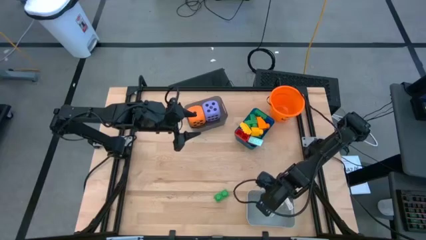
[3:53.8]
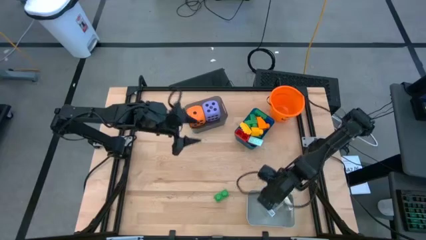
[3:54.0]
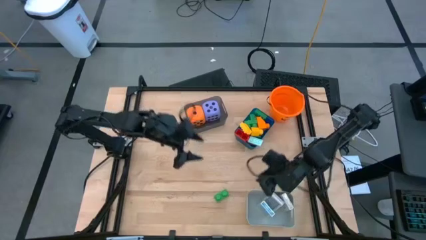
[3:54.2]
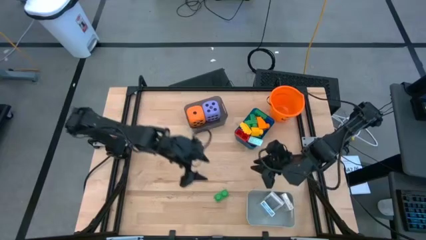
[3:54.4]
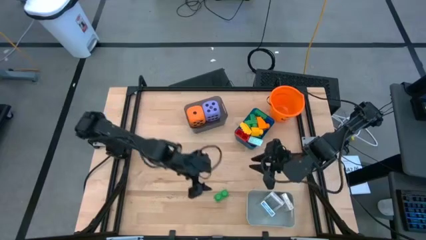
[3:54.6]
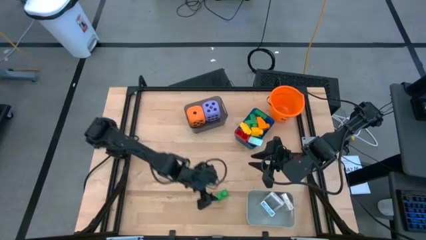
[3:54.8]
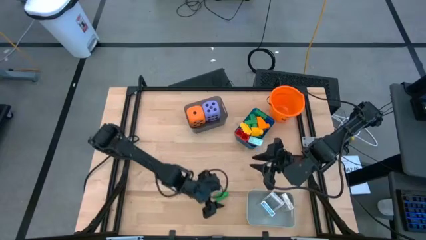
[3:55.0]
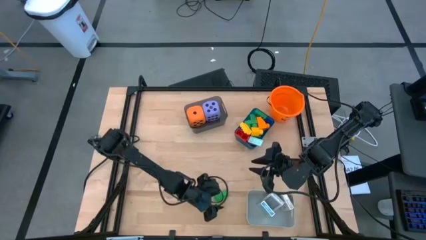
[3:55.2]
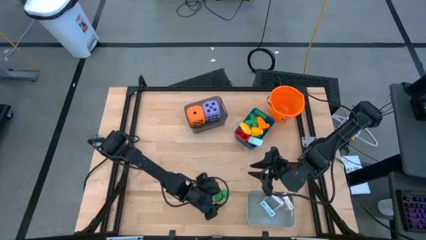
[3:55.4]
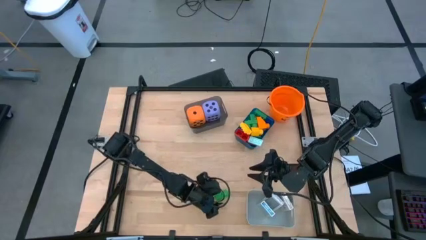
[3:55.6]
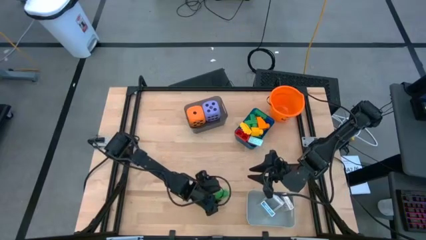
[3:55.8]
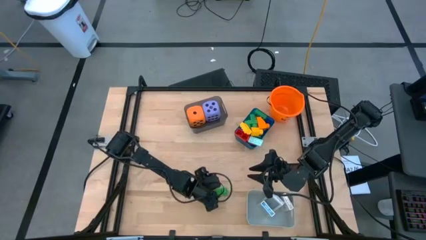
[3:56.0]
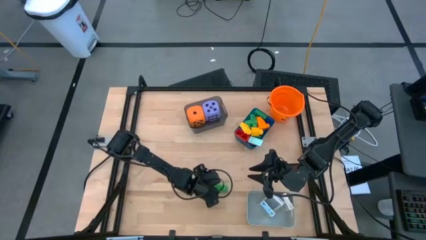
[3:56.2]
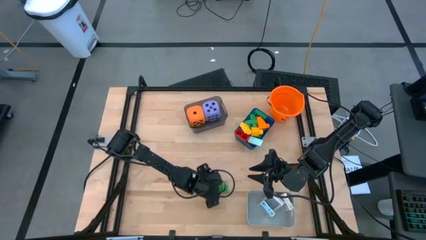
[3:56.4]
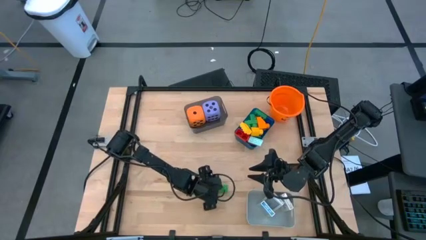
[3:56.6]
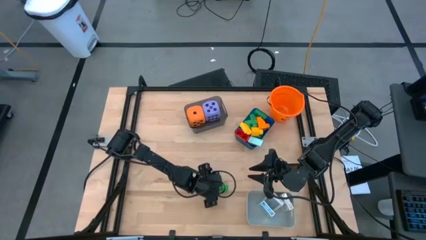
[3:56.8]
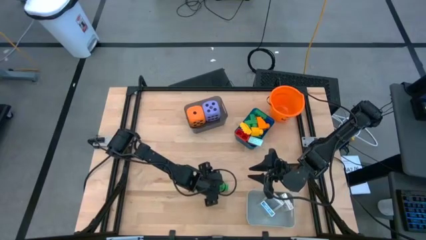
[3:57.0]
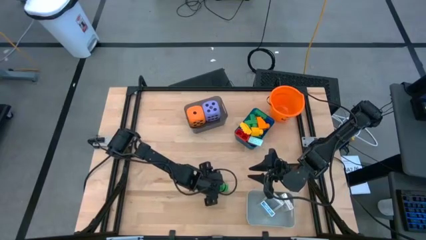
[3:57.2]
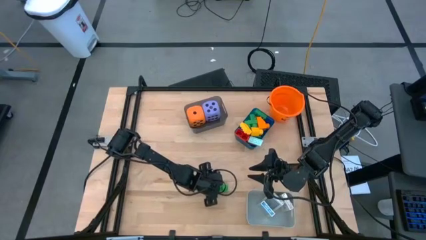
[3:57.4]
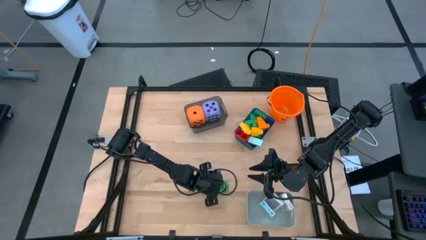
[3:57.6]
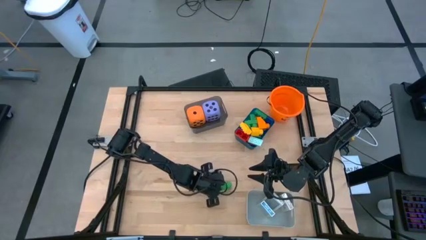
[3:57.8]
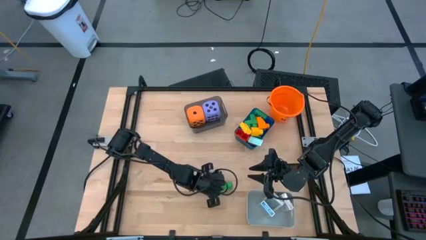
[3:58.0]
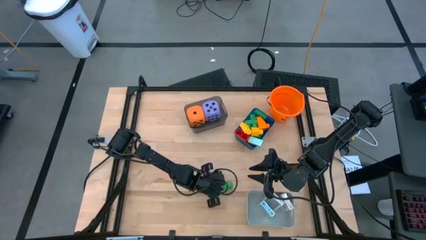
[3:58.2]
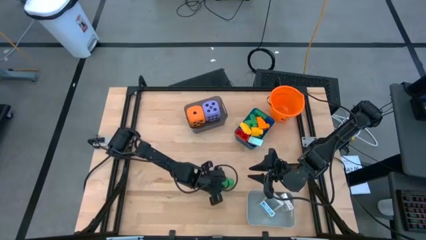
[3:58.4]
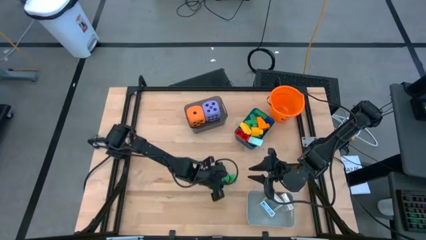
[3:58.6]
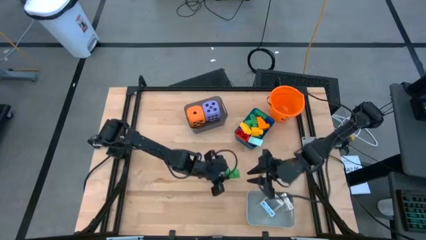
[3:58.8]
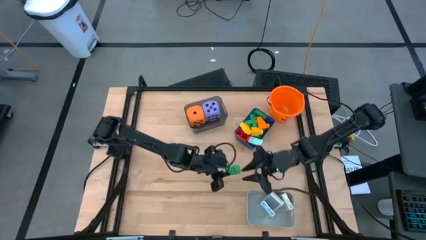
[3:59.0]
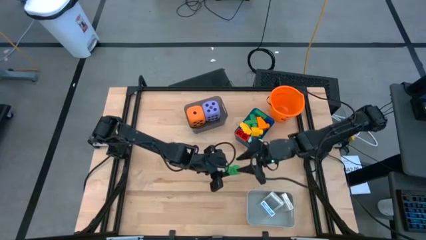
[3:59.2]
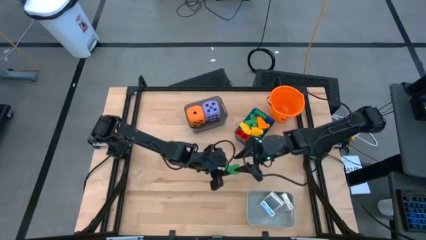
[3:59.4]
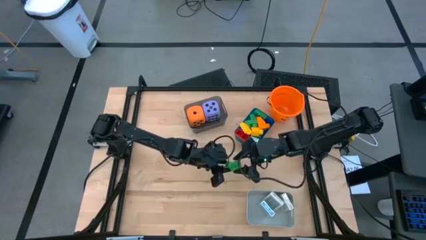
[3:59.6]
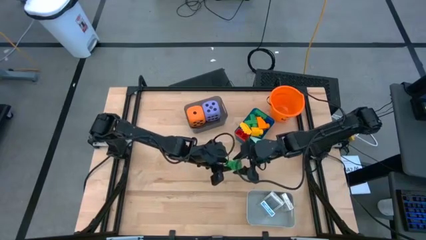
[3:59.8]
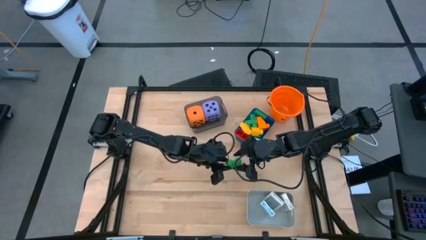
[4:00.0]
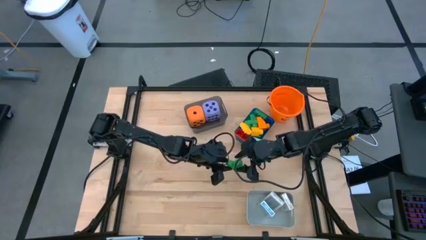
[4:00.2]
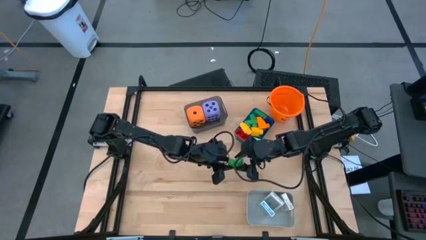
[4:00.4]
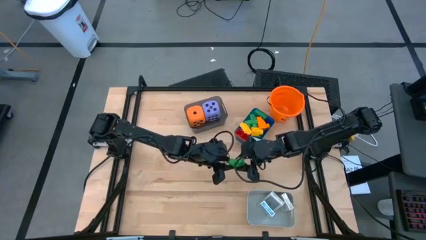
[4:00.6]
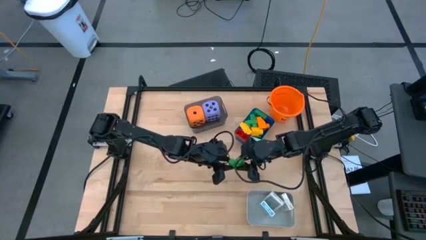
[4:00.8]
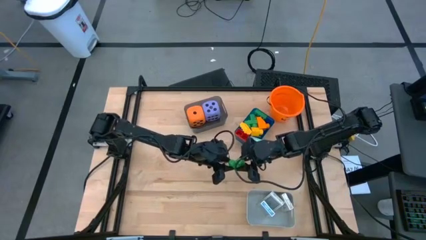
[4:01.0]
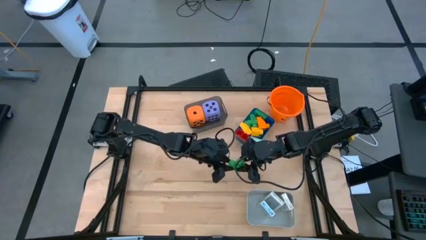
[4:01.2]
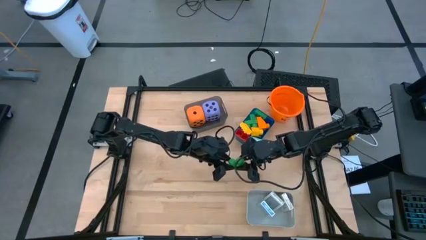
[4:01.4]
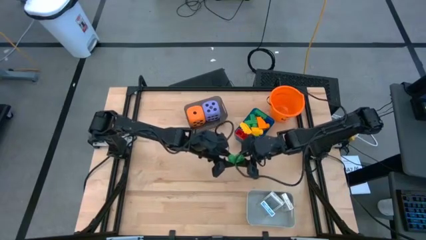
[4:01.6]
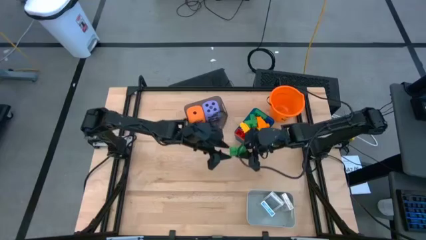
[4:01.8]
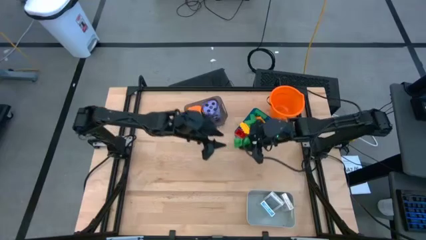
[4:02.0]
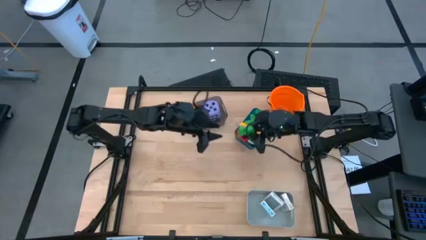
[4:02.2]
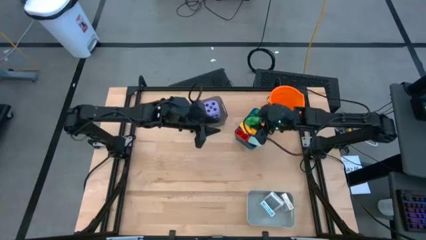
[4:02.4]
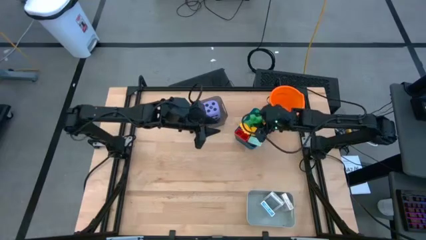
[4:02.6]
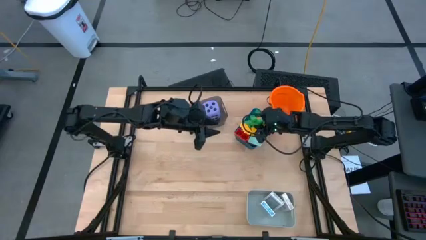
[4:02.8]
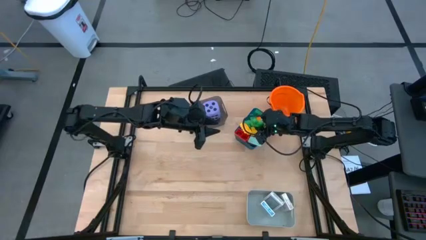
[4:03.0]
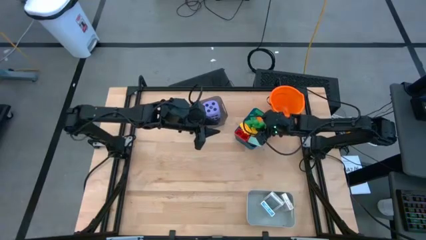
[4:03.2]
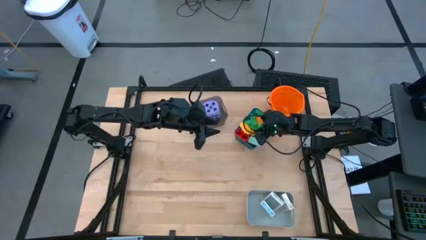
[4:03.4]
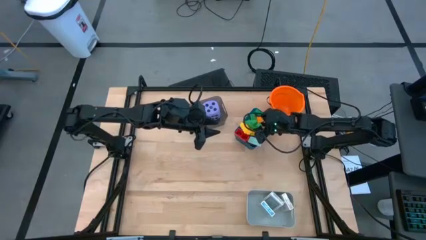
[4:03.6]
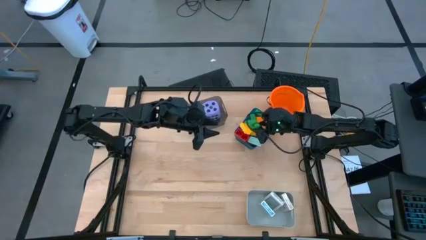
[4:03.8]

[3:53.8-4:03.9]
Task: Pick & Place Toys
Put the green game piece into the blue bin

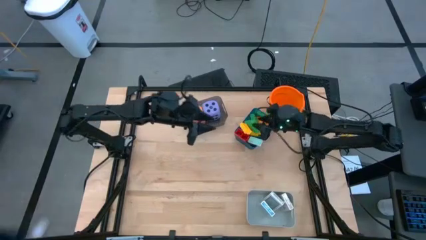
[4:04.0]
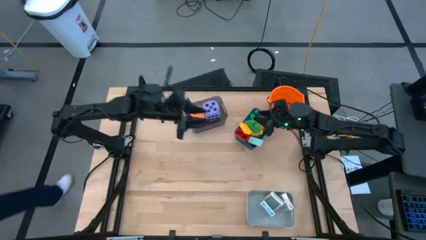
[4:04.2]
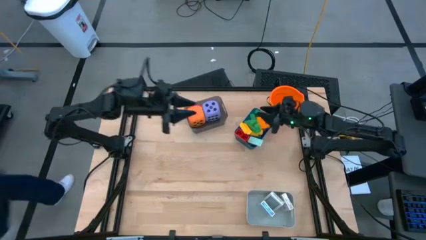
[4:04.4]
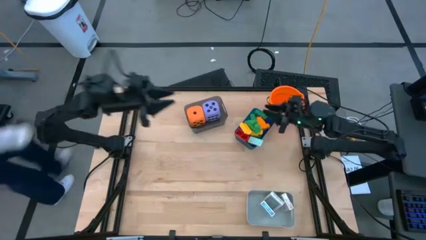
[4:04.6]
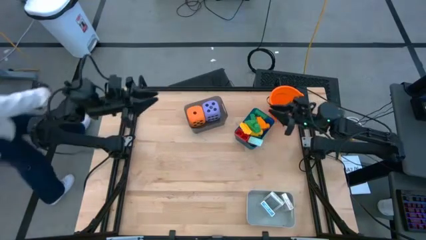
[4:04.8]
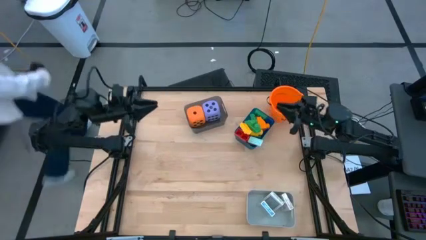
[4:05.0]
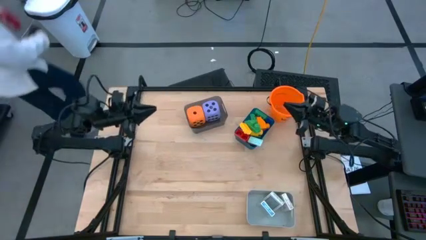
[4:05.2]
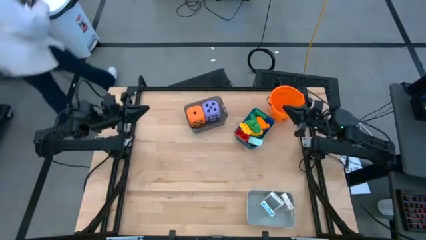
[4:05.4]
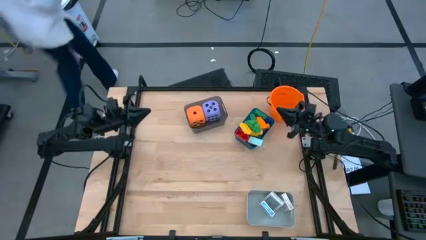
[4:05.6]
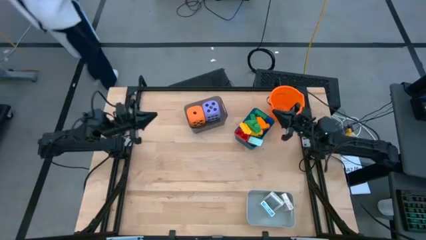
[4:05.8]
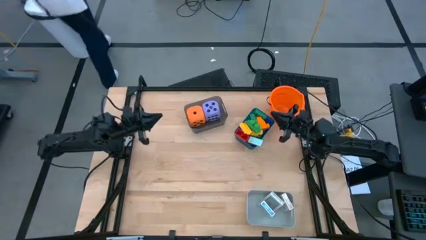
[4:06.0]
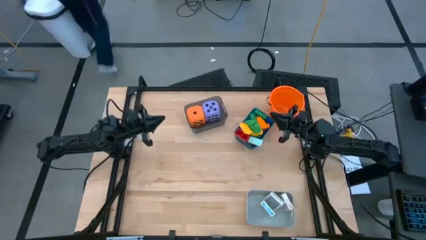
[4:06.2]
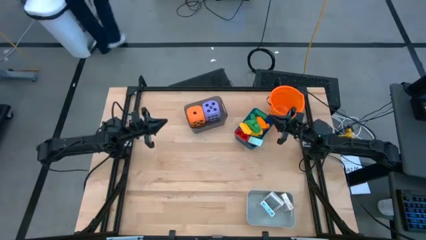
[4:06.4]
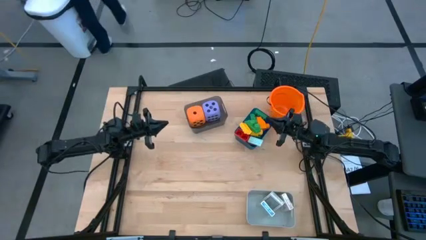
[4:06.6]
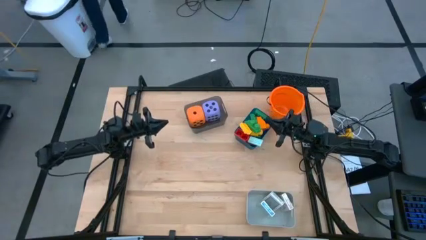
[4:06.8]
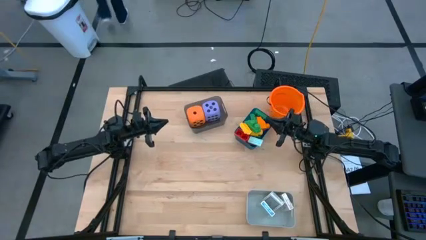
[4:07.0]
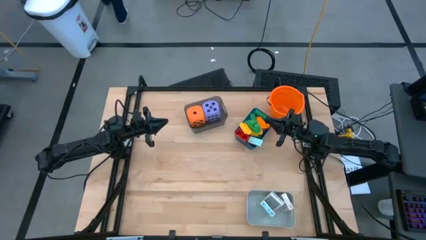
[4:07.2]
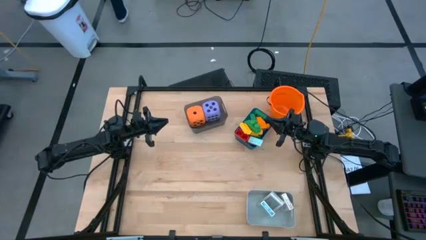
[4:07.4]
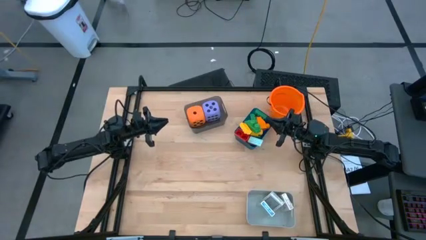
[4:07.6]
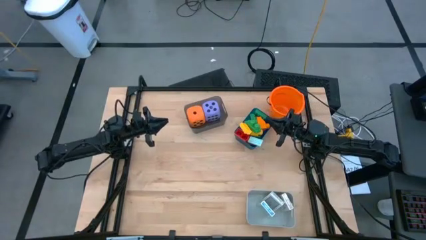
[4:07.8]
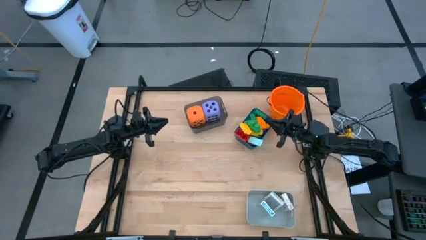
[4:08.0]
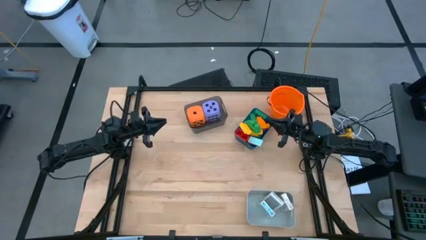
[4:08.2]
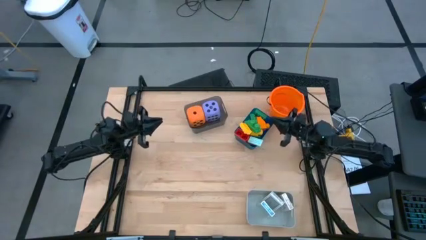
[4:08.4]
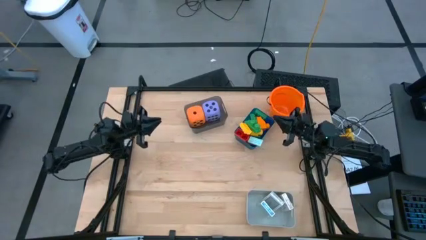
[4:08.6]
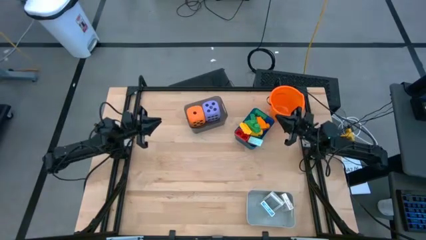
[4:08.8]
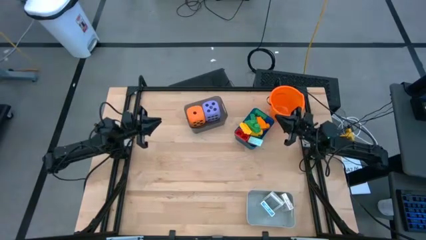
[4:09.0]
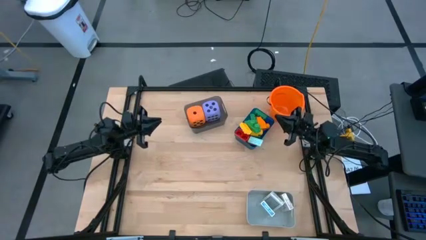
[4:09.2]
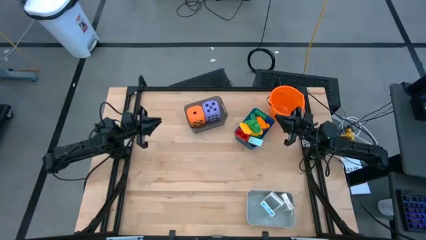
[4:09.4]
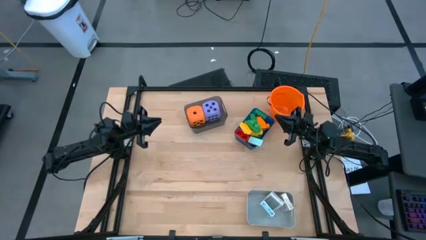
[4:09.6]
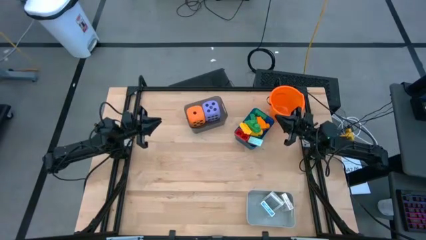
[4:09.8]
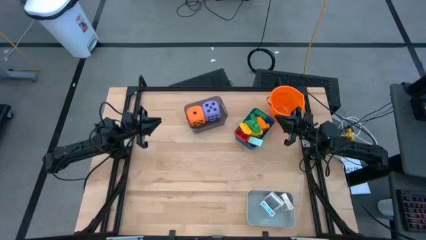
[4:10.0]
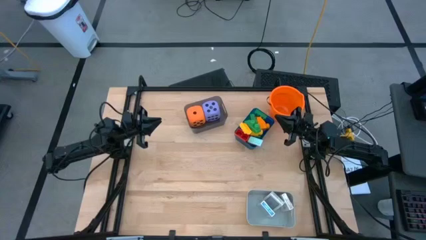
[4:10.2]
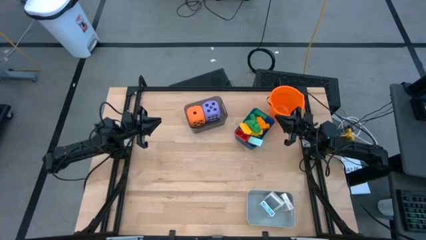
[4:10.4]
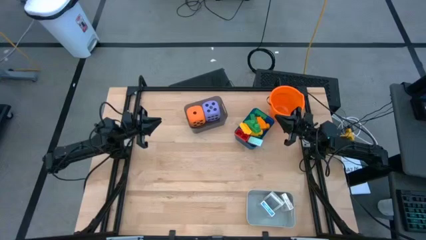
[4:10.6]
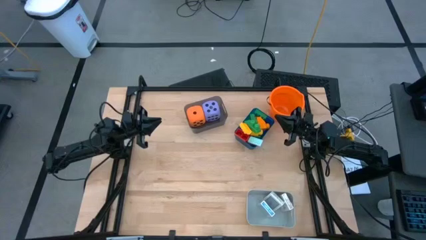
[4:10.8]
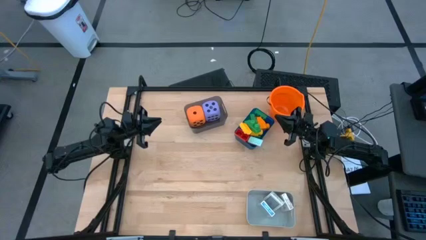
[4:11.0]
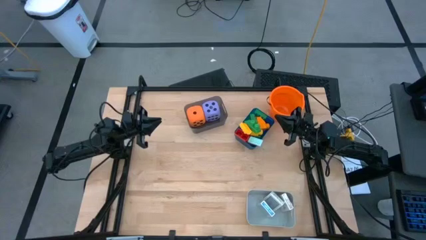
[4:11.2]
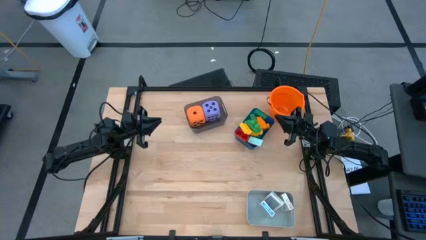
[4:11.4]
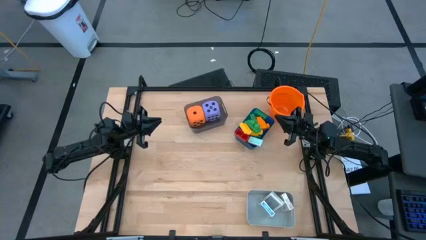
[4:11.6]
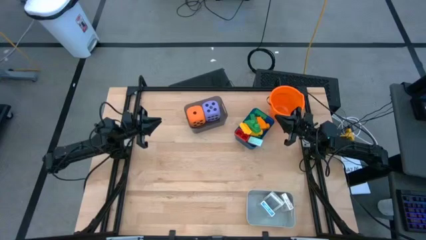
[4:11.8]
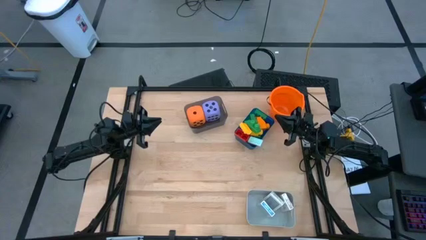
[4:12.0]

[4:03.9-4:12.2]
Return to Home Position
